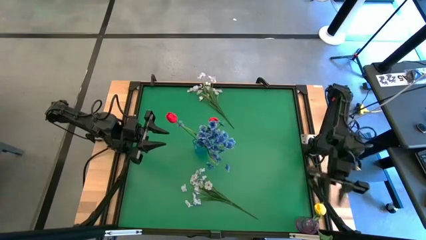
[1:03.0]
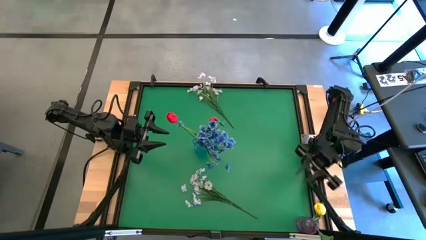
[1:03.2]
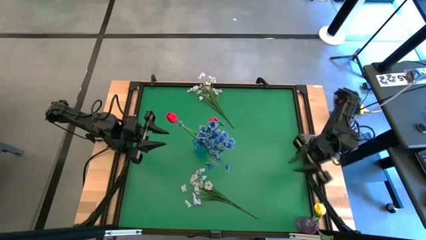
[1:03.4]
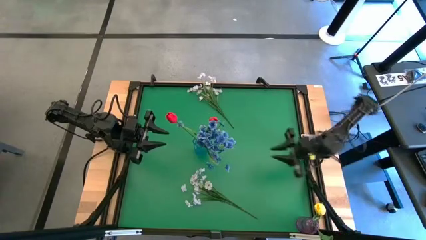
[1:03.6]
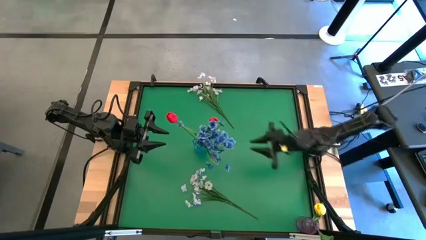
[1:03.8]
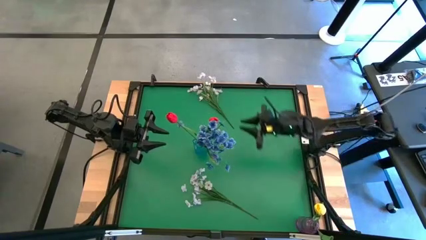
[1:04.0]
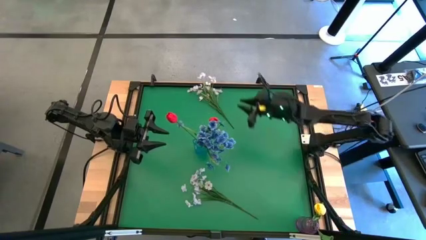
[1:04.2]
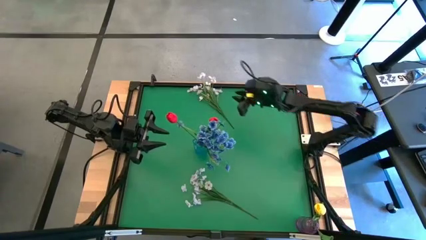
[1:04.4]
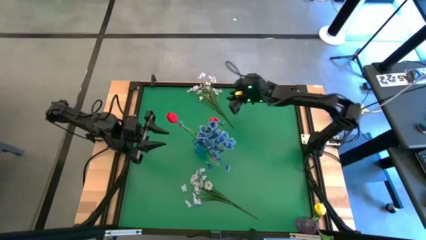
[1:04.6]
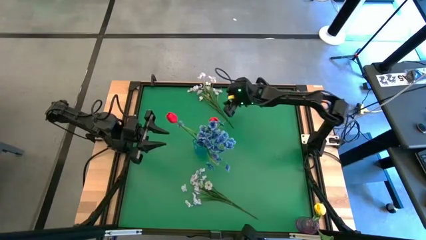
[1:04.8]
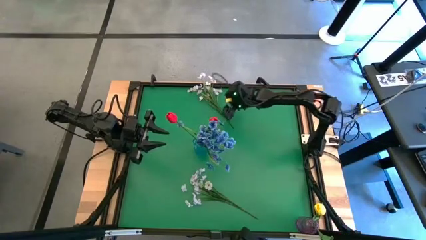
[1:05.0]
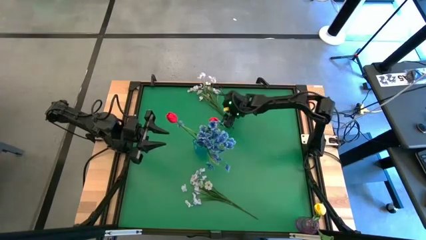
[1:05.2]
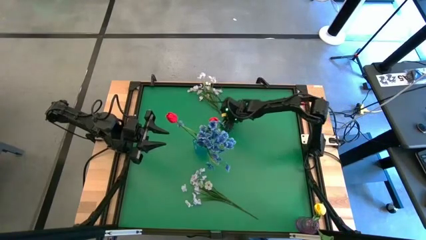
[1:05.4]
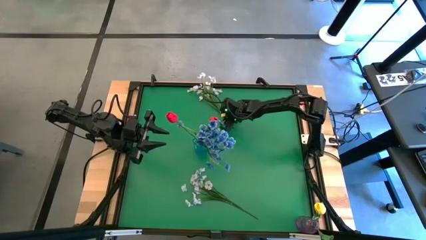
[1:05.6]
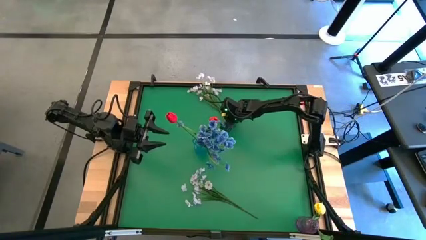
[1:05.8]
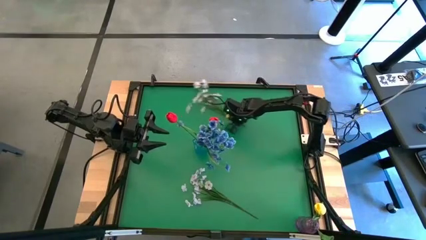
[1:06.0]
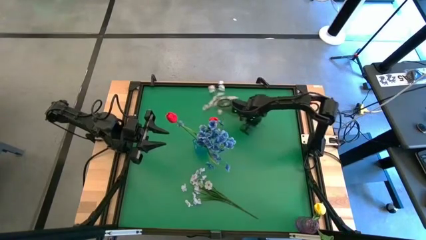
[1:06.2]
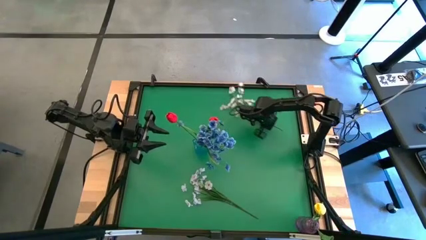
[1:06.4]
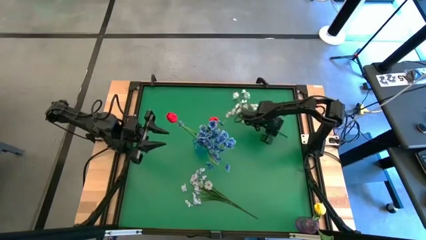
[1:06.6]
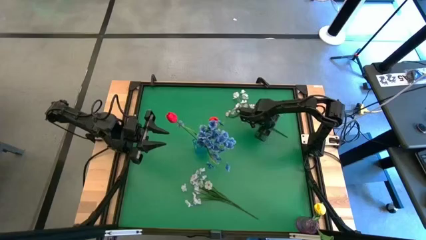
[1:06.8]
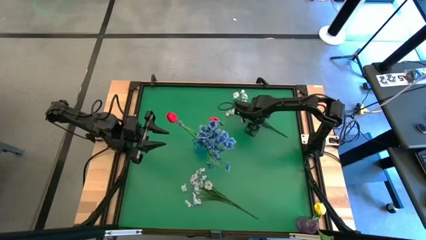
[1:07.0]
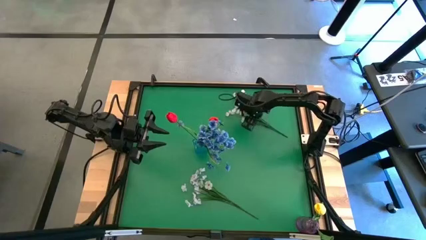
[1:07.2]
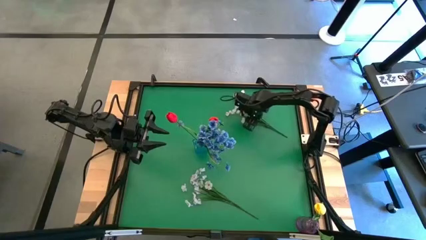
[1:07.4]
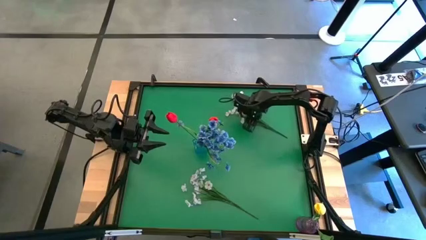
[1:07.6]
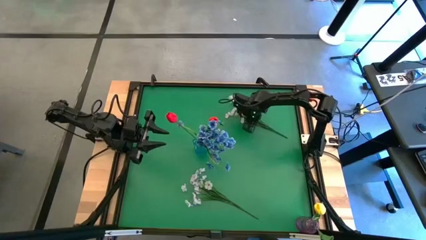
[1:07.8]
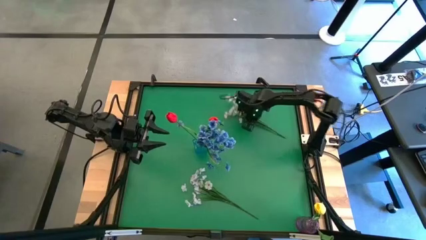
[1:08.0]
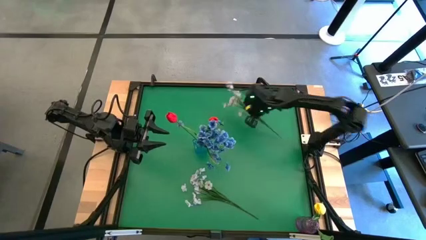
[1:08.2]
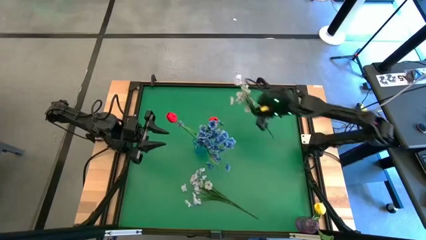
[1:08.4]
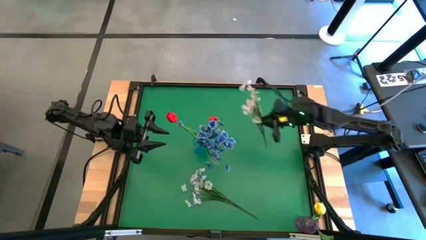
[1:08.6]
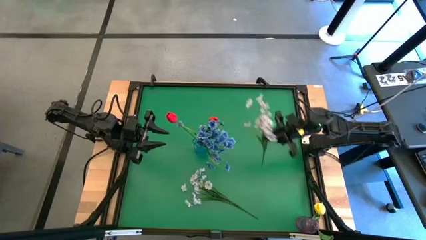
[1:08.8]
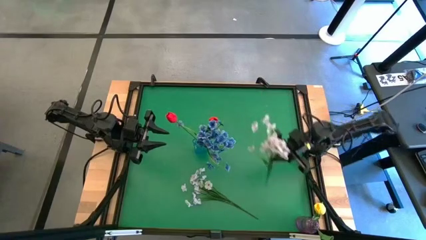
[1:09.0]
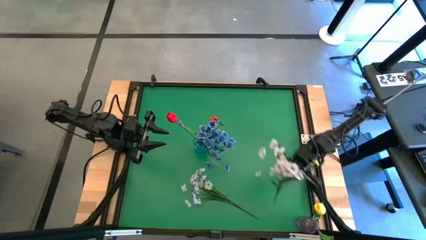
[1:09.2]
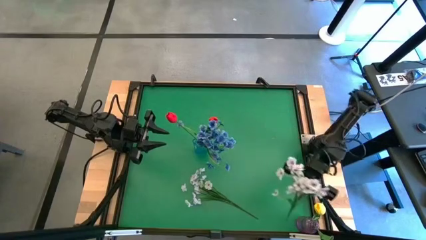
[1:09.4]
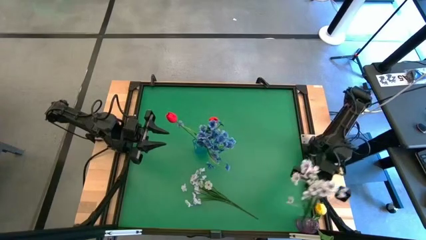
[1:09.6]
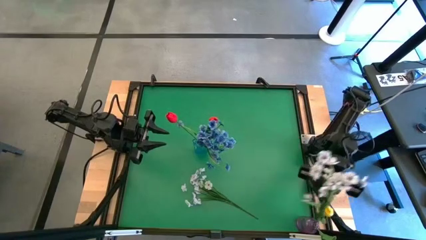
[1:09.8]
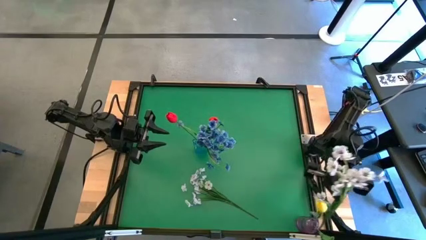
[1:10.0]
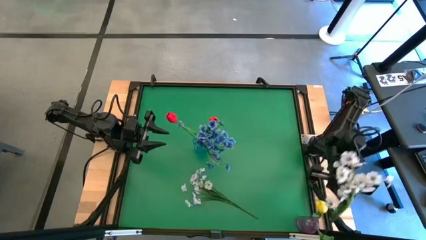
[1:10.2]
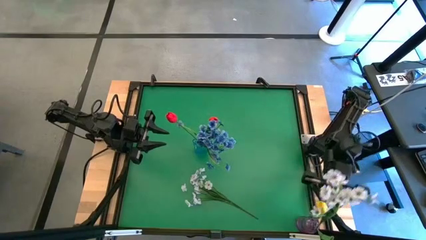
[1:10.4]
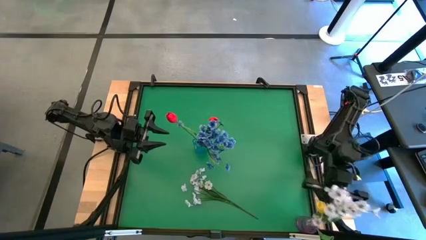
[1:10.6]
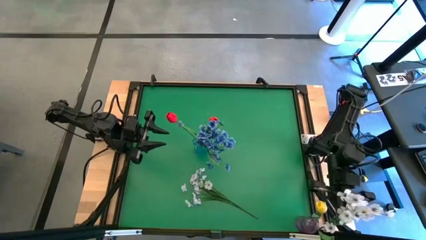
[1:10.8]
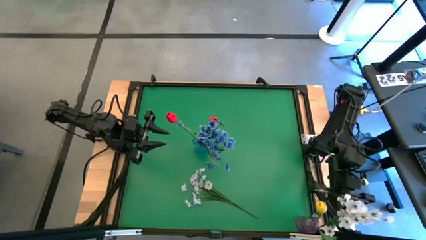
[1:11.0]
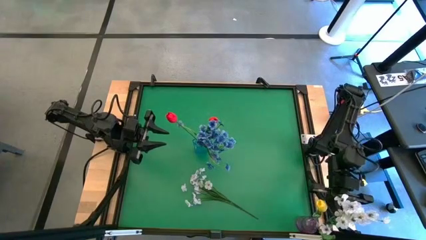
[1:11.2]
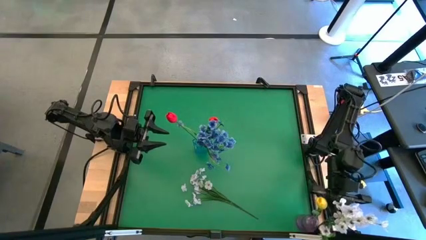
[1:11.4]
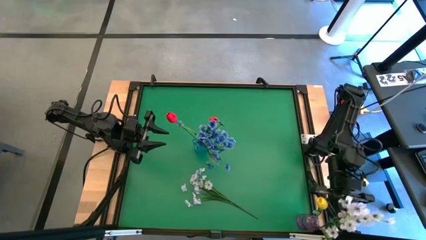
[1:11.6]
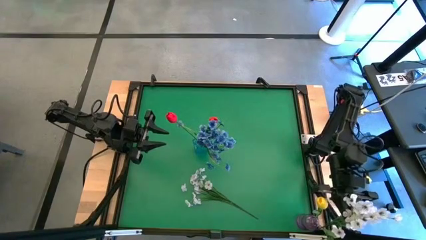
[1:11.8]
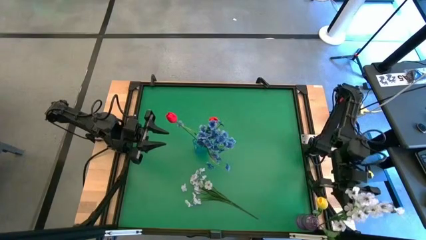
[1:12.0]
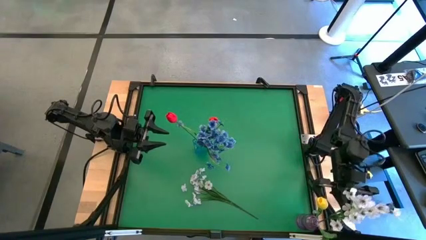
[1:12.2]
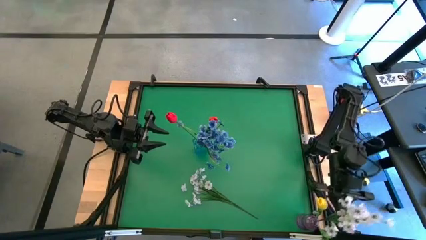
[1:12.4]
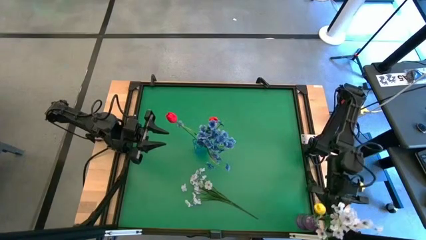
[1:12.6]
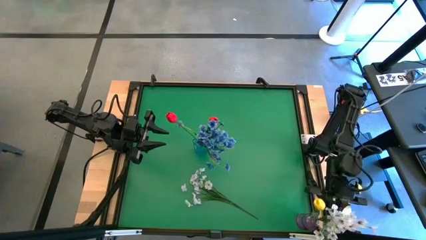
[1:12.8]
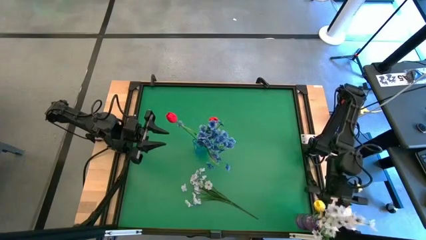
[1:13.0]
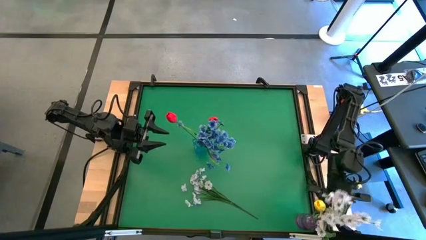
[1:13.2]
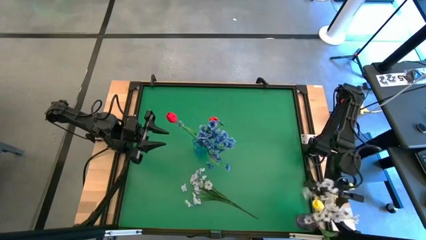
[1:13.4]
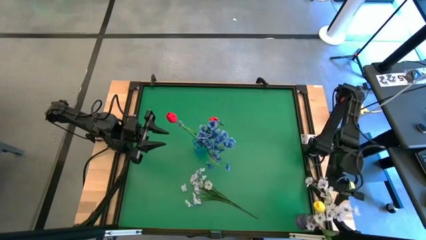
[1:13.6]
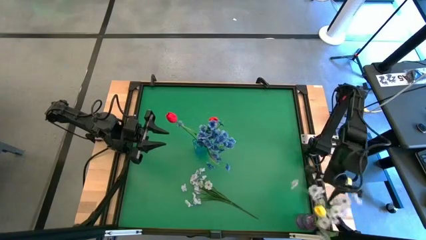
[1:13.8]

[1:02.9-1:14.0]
Task: Sort flowers into vase by color
Put the white flowers into the purple vase
